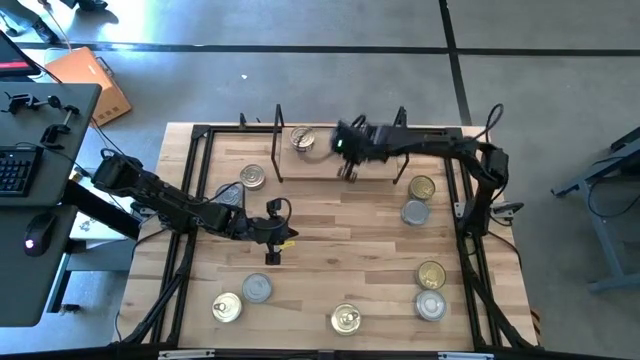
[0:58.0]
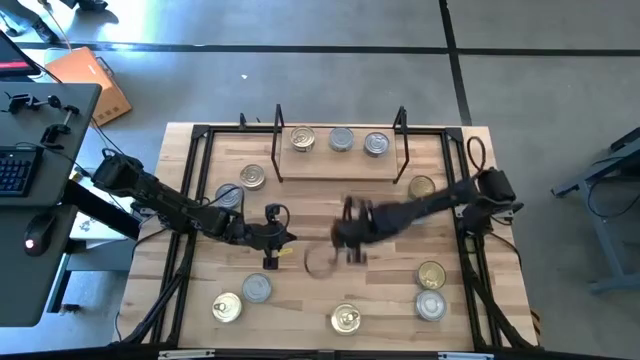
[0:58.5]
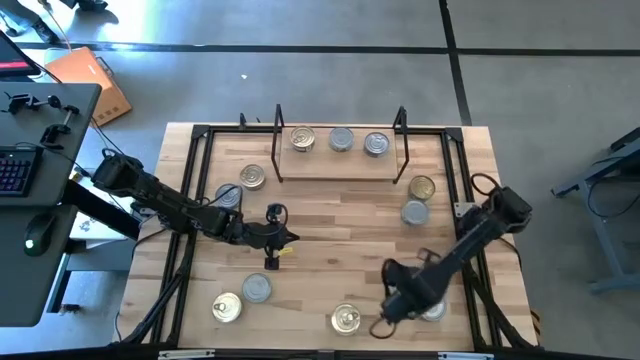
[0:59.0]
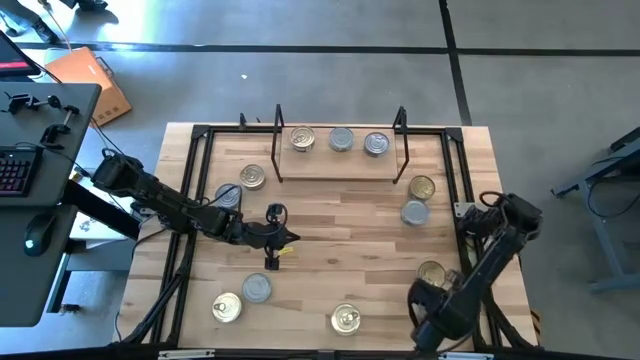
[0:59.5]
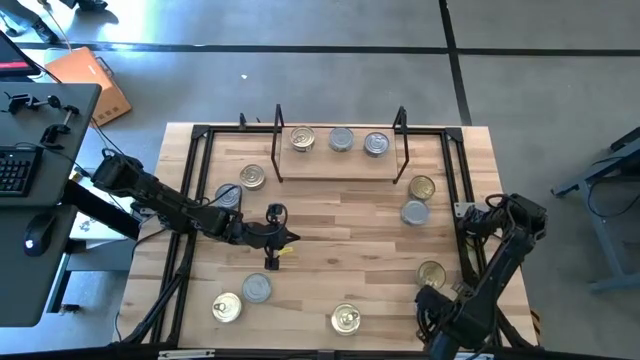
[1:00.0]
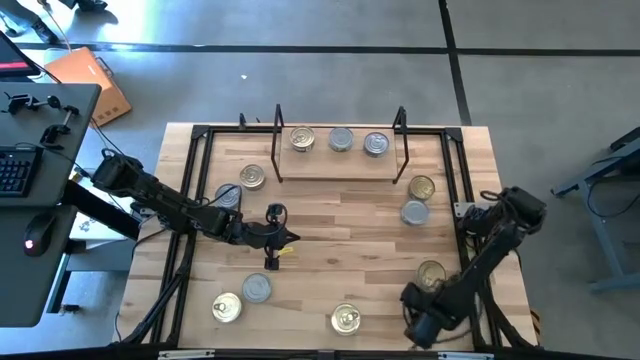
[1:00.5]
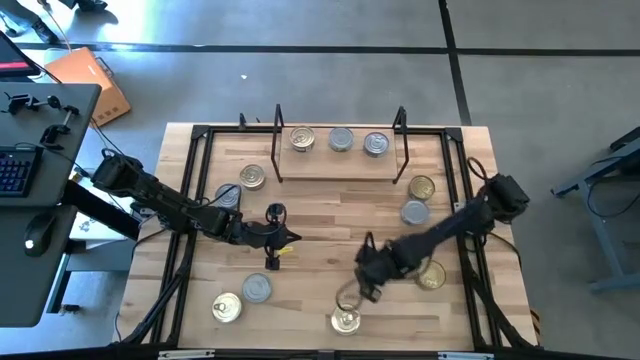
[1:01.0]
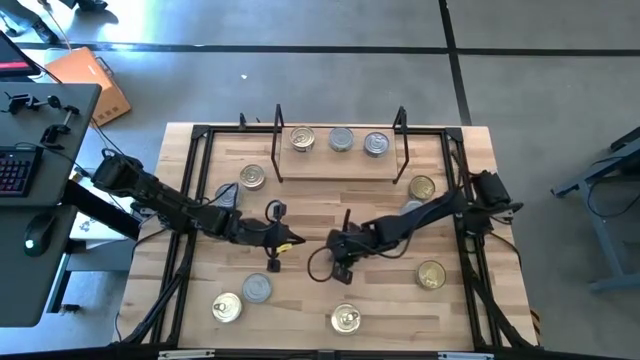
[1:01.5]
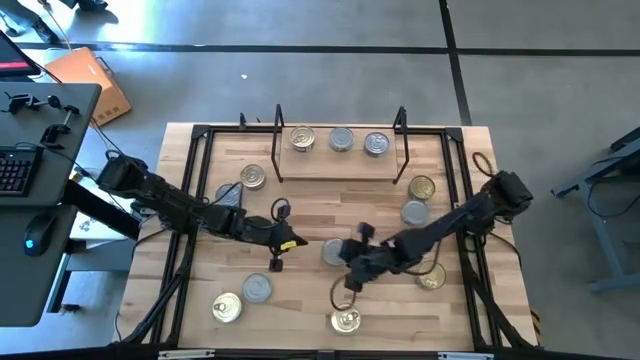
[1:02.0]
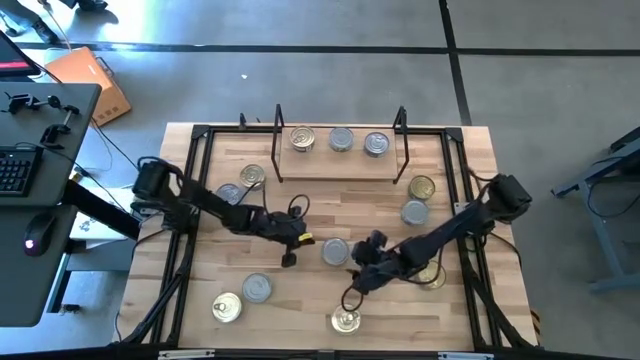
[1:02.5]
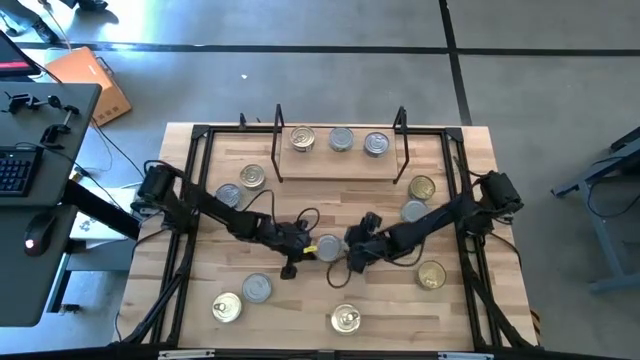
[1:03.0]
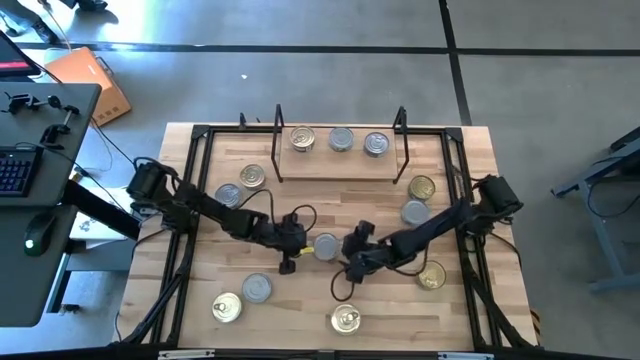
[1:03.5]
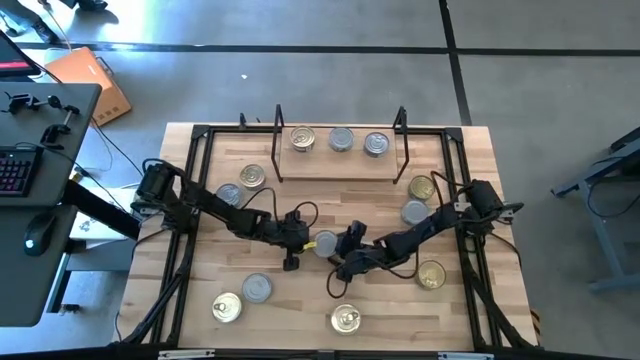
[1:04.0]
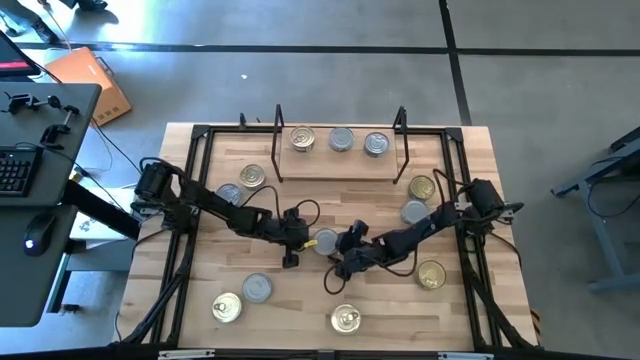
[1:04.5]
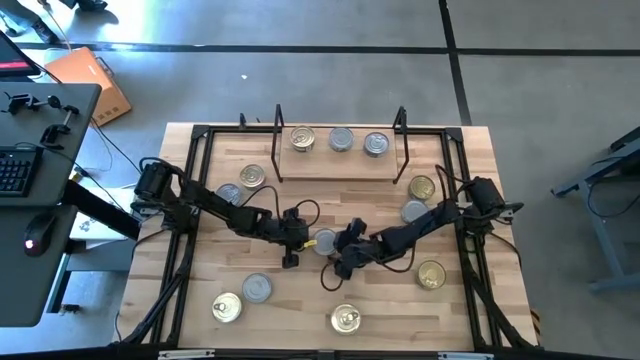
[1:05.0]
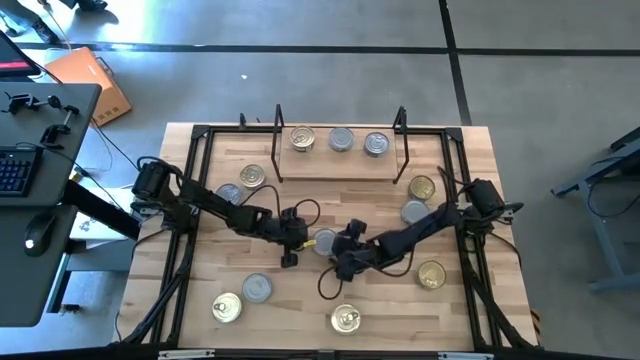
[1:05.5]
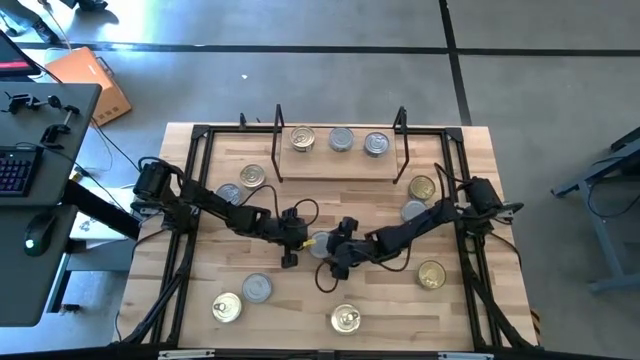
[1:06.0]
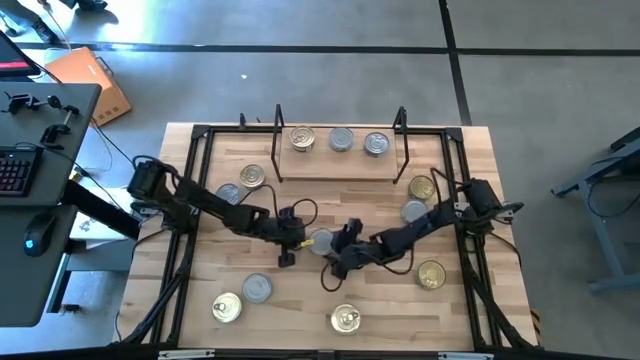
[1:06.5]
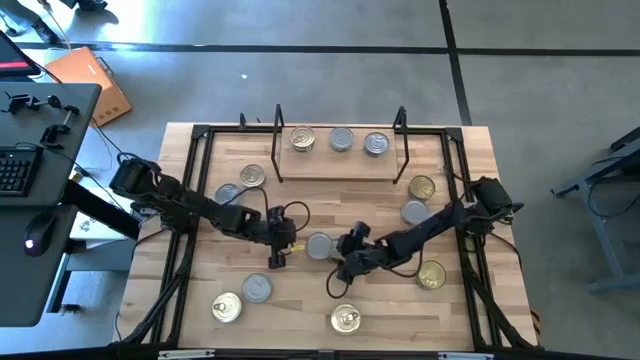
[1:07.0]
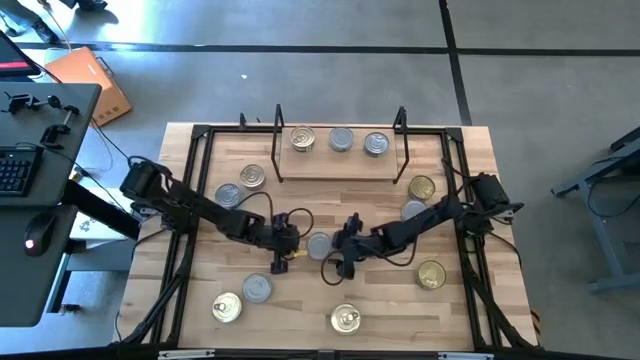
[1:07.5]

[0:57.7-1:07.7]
Task: Stack canned seafood by type on shelf
Put the green tuna can on the shelf

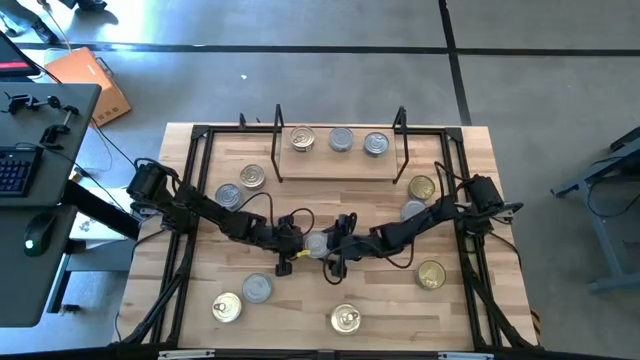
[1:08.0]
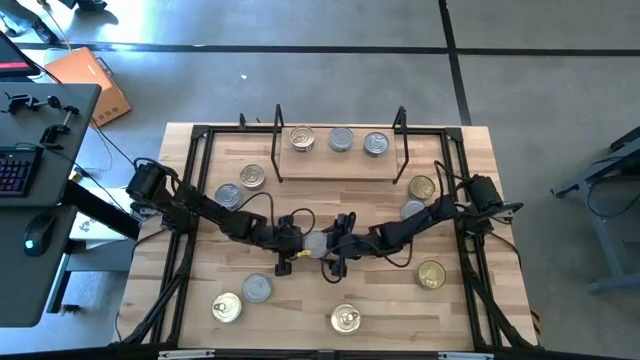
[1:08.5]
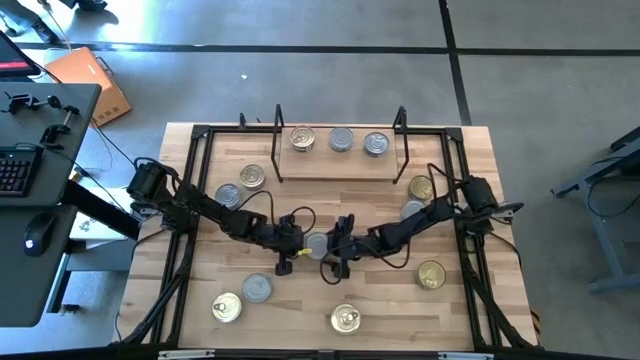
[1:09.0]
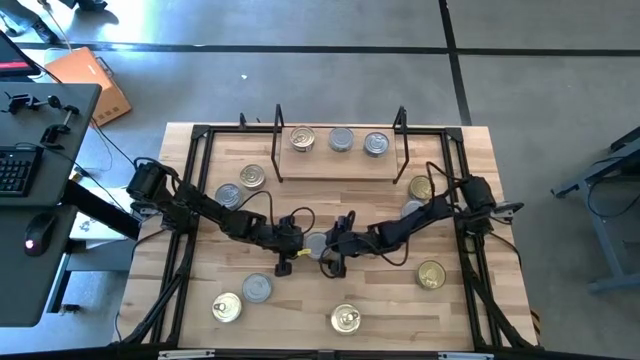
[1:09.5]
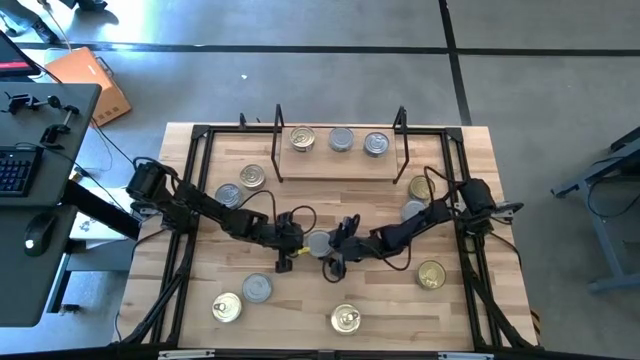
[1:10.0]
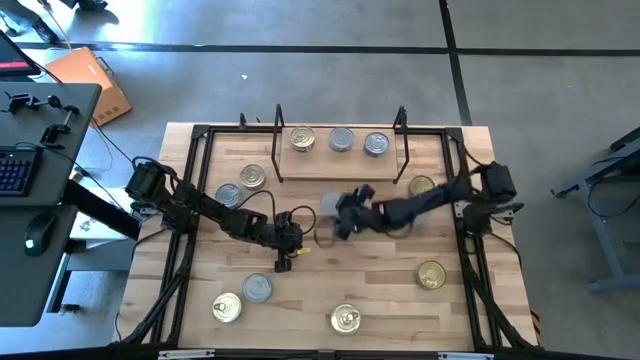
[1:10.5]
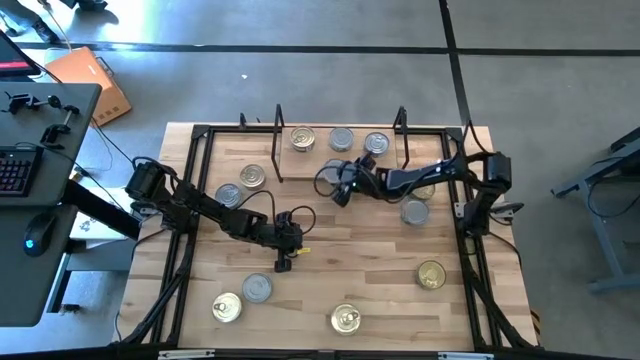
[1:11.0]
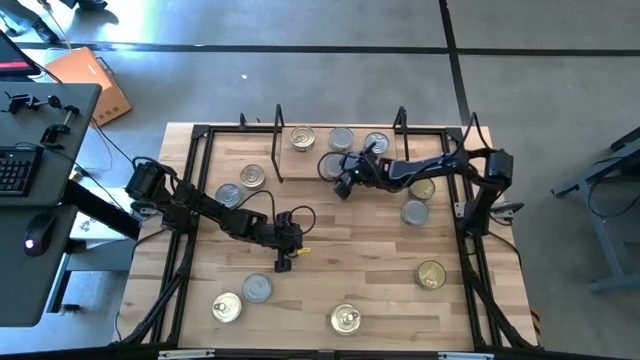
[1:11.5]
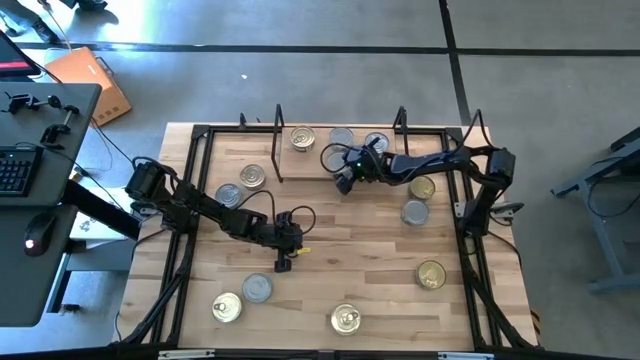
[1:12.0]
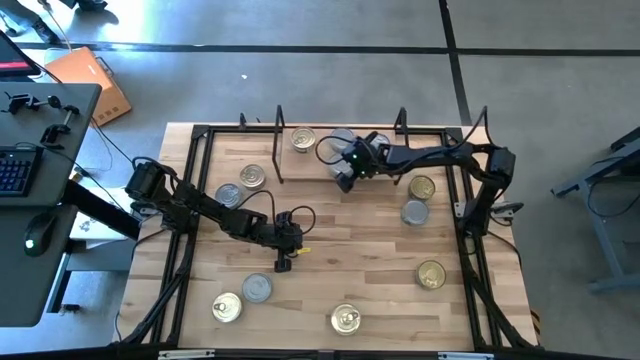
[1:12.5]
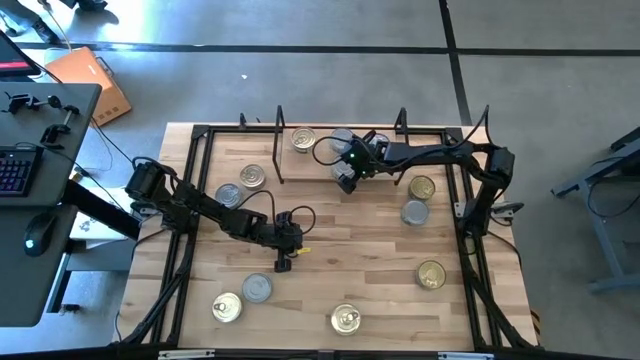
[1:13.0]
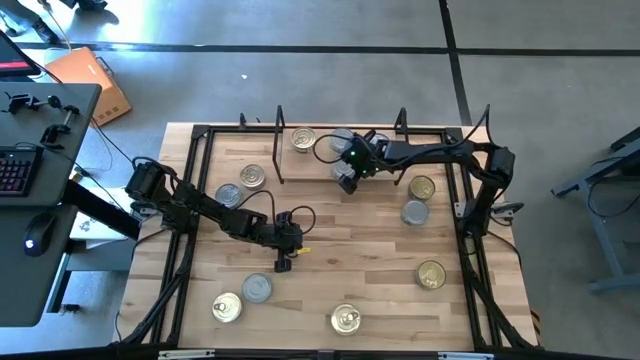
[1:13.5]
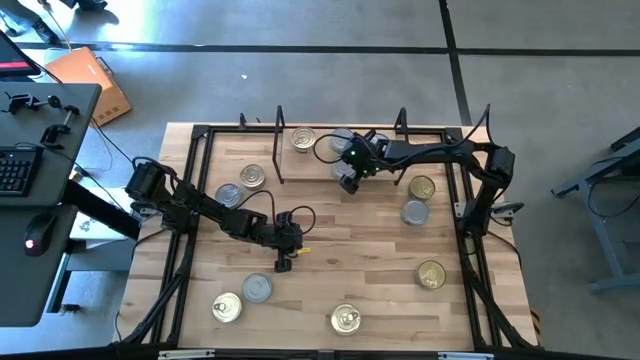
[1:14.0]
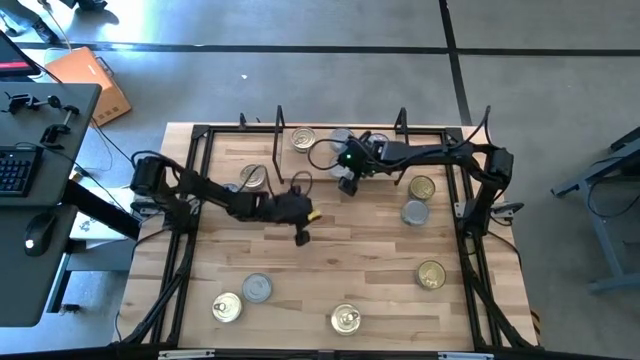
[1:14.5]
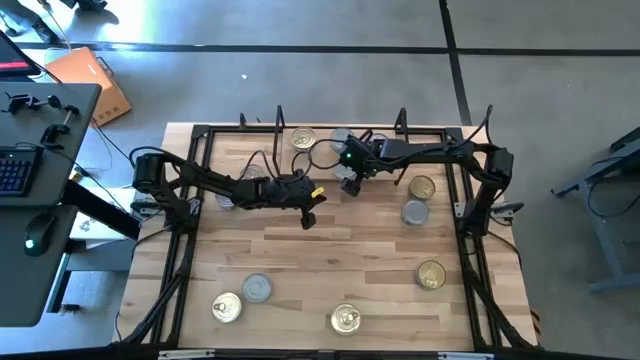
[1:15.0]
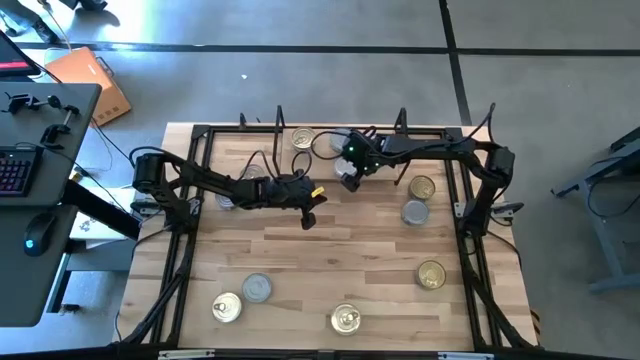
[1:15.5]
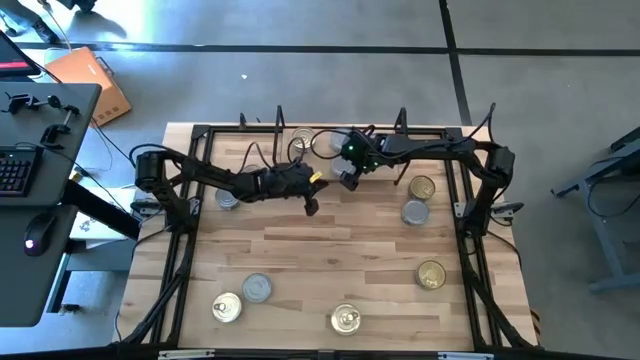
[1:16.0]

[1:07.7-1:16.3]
Put the green tuna can on the shelf aligned with the other green tuna can

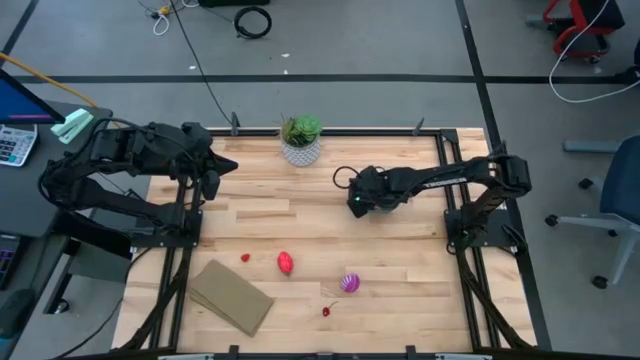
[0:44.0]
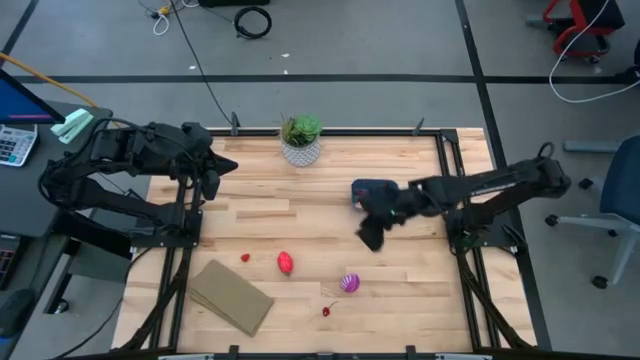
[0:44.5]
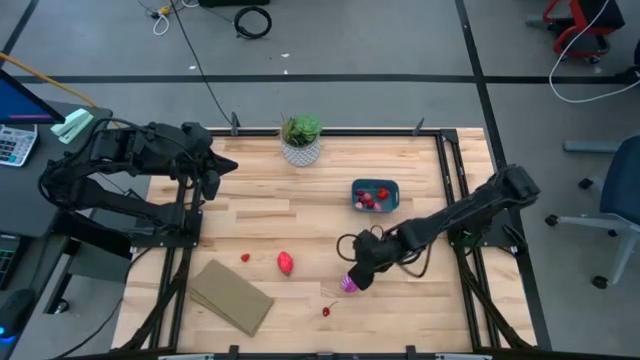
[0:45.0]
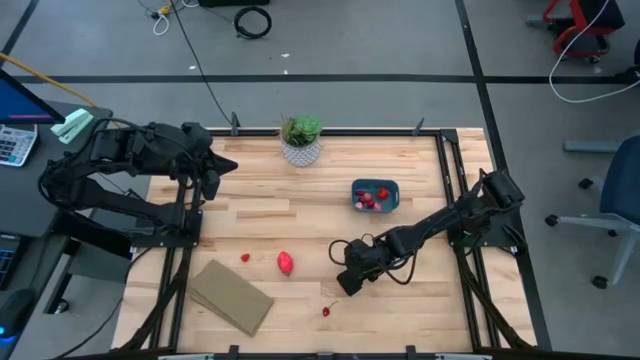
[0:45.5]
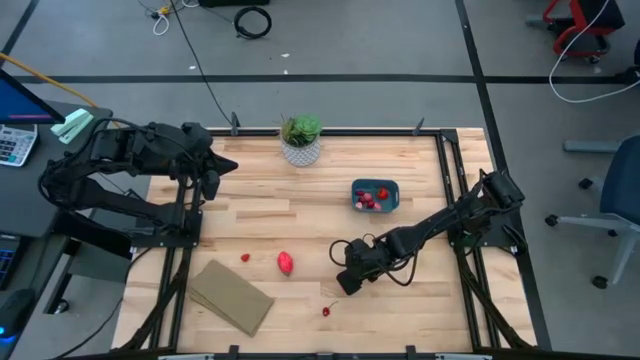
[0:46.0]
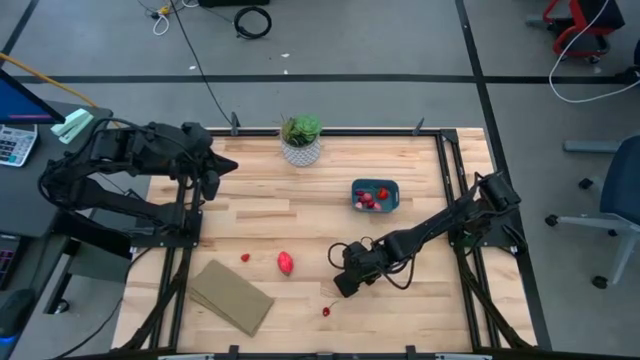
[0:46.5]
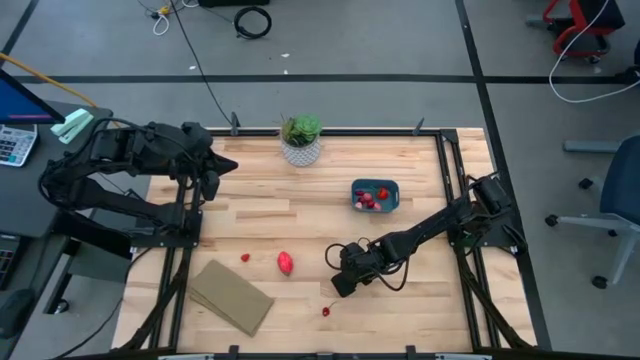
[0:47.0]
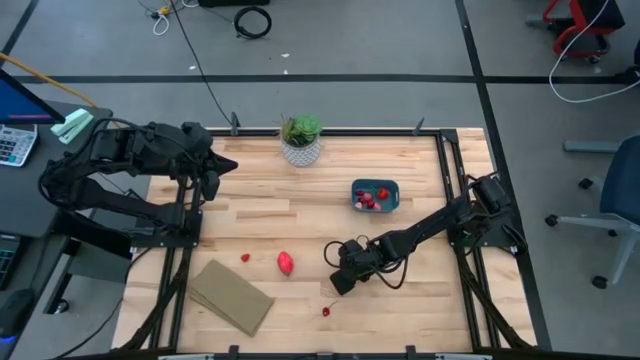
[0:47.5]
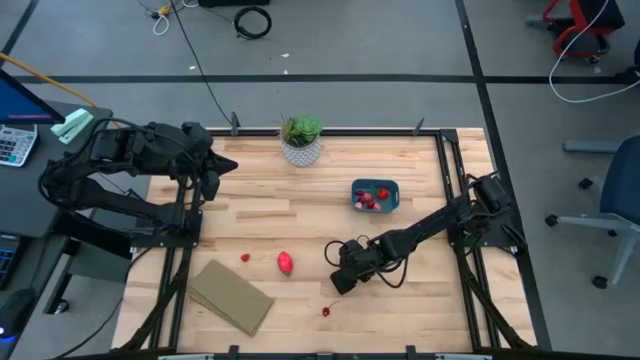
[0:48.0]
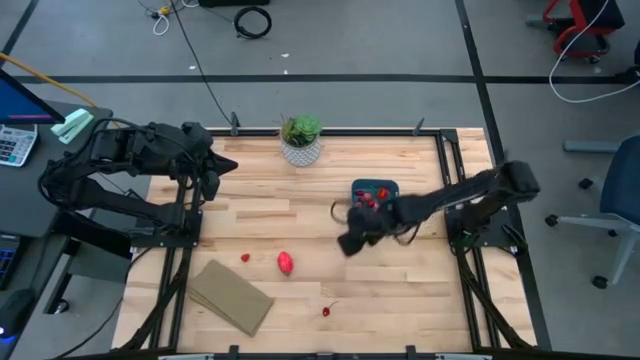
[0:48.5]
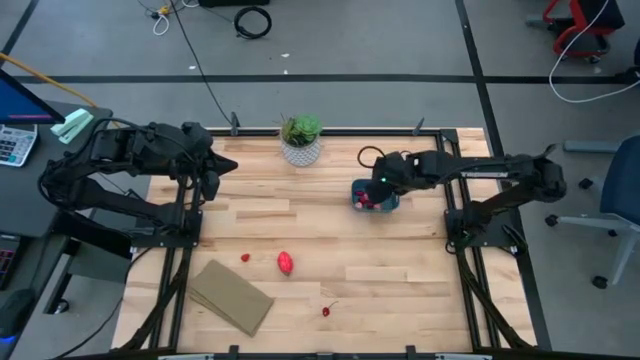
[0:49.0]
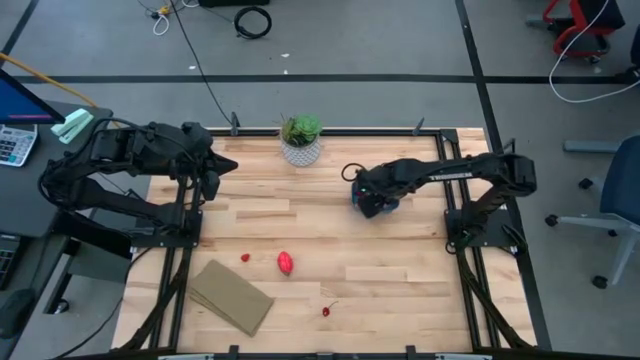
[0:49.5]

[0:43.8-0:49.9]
Task: Pick and placing Produce into tupperware
Put the purple onion into the blue bin
